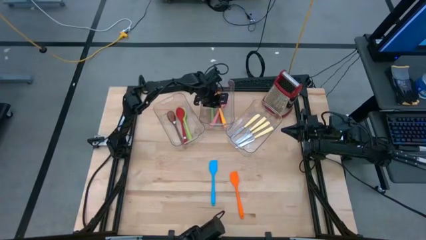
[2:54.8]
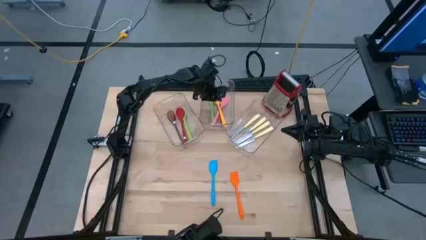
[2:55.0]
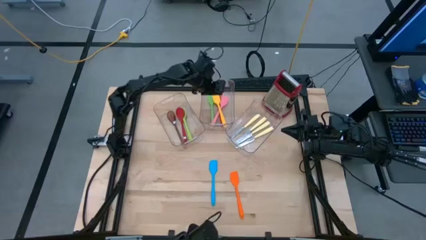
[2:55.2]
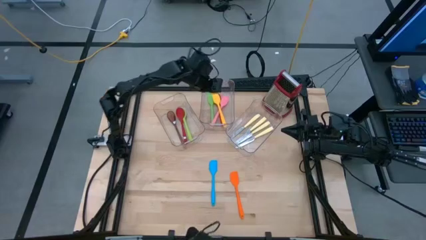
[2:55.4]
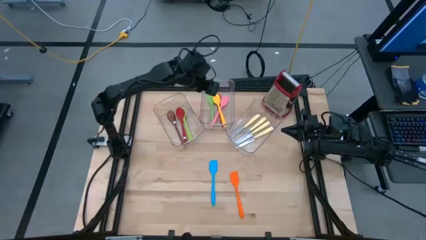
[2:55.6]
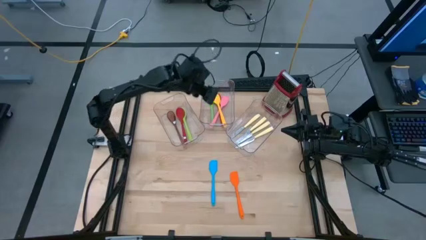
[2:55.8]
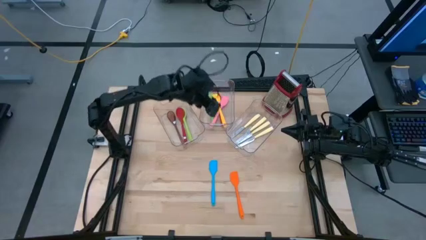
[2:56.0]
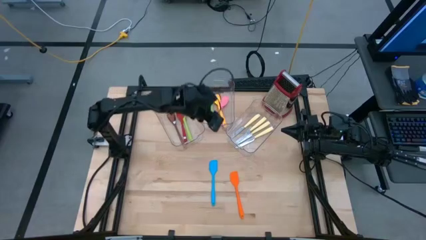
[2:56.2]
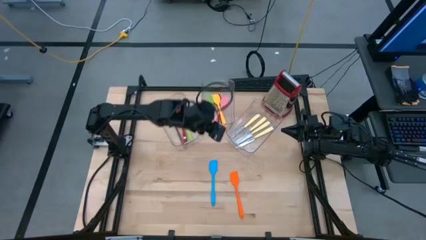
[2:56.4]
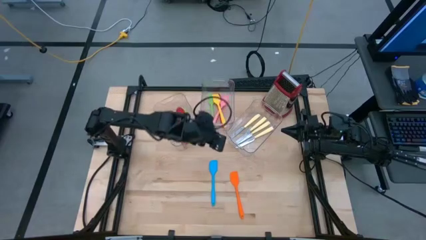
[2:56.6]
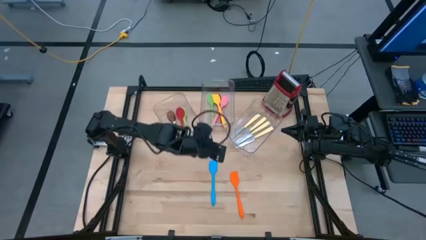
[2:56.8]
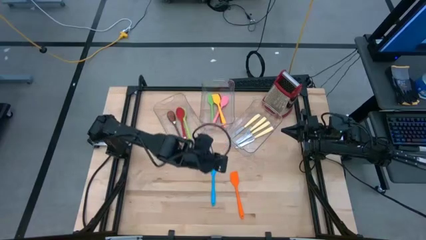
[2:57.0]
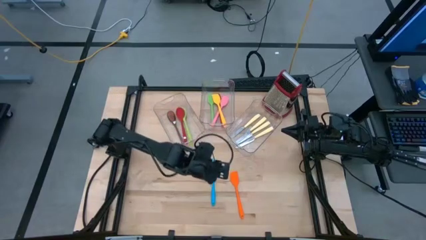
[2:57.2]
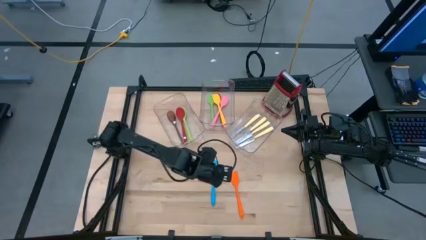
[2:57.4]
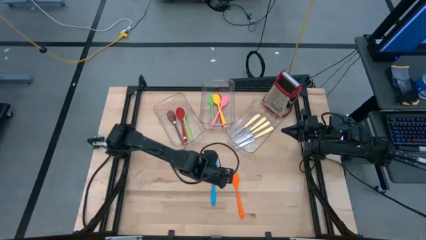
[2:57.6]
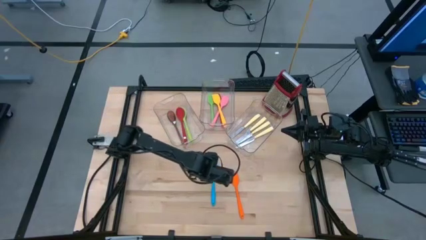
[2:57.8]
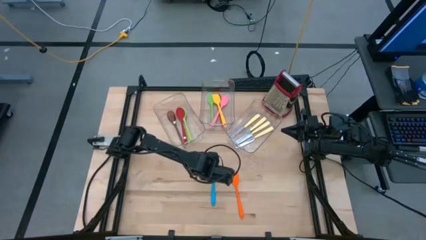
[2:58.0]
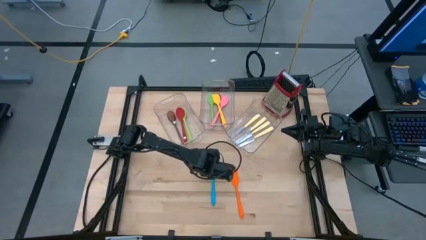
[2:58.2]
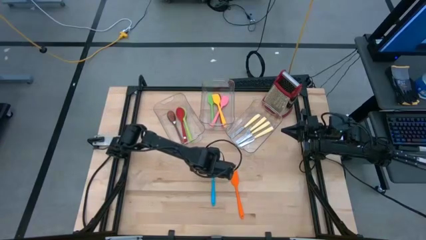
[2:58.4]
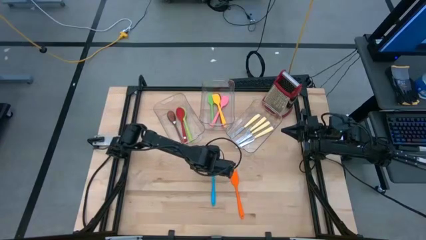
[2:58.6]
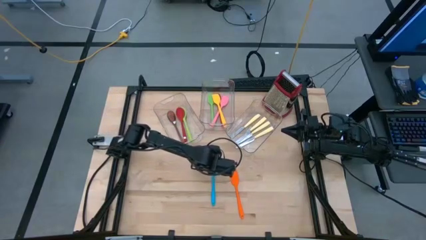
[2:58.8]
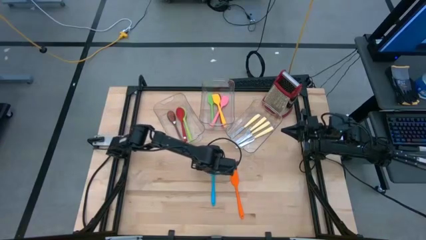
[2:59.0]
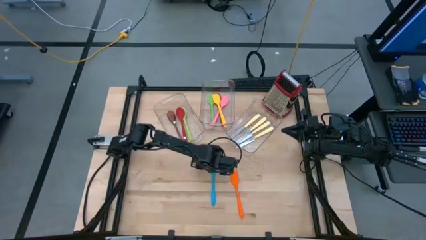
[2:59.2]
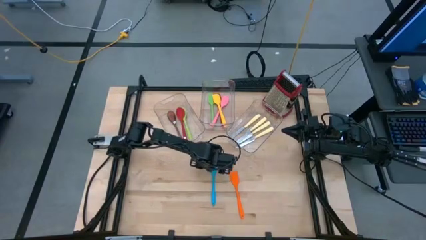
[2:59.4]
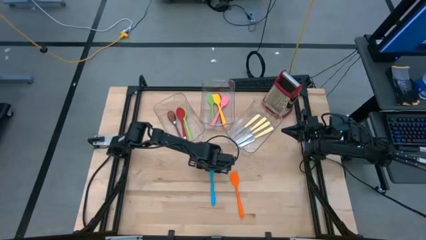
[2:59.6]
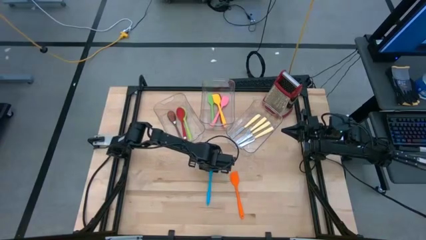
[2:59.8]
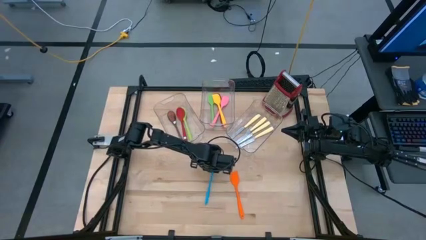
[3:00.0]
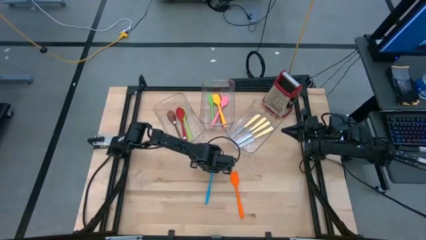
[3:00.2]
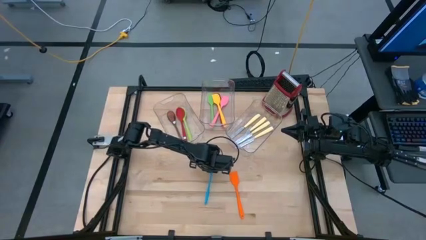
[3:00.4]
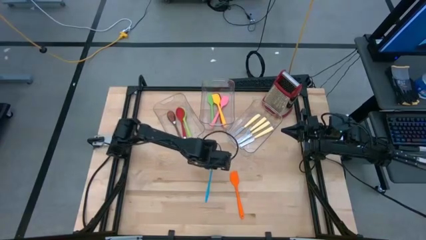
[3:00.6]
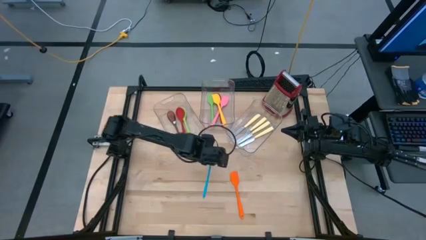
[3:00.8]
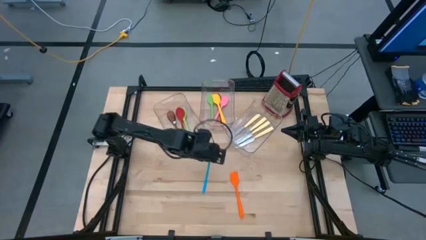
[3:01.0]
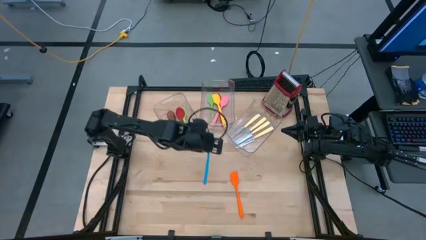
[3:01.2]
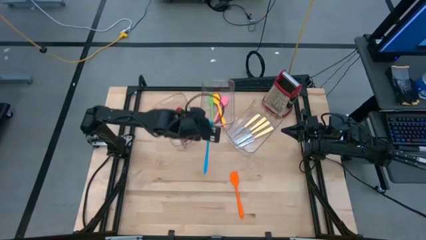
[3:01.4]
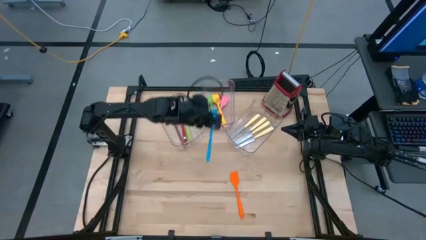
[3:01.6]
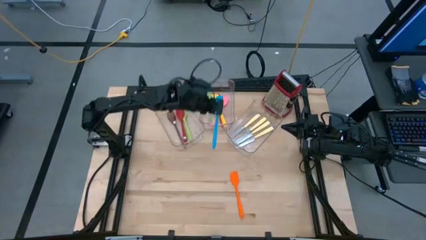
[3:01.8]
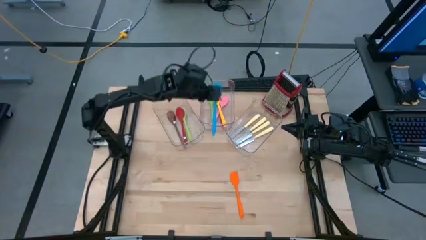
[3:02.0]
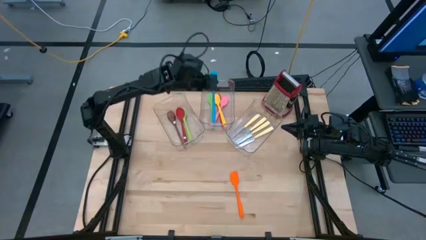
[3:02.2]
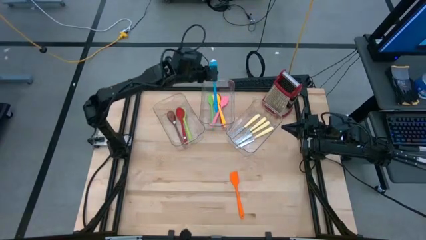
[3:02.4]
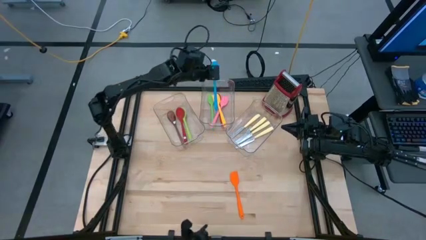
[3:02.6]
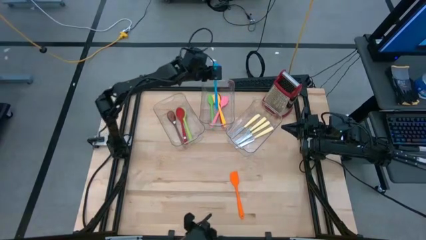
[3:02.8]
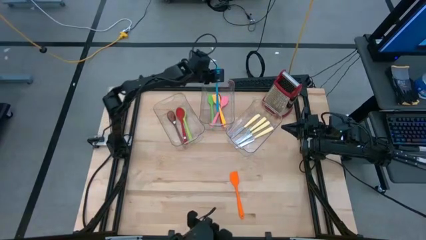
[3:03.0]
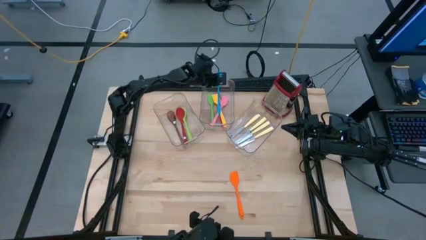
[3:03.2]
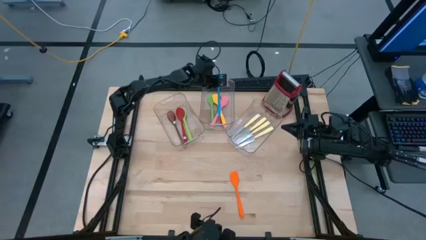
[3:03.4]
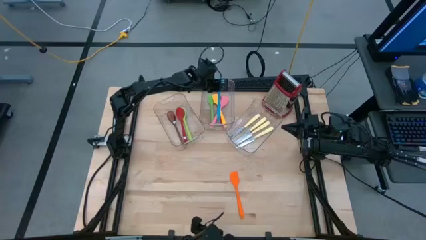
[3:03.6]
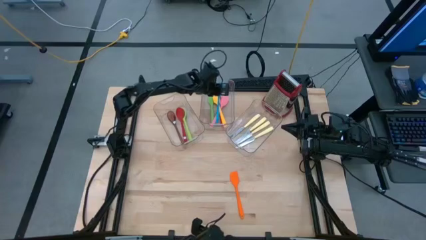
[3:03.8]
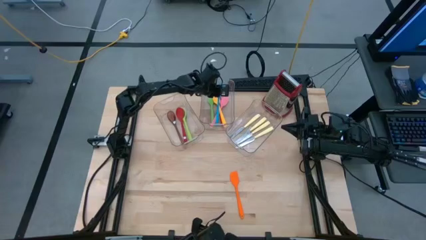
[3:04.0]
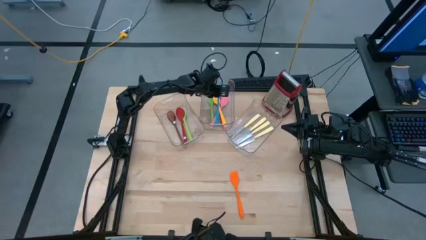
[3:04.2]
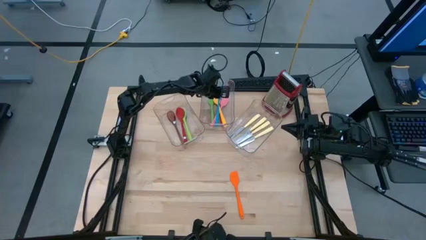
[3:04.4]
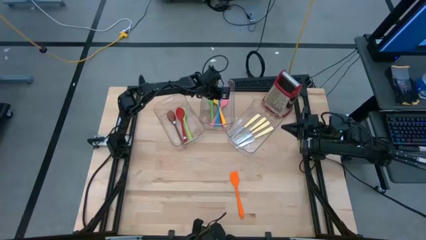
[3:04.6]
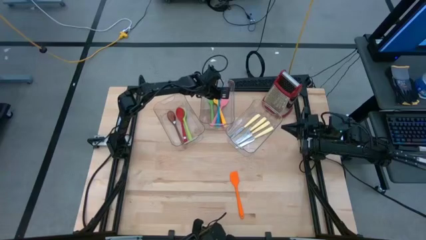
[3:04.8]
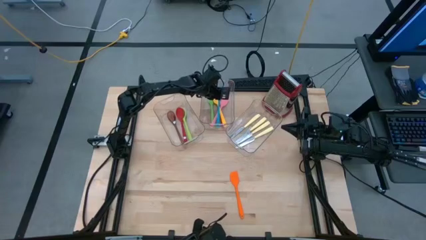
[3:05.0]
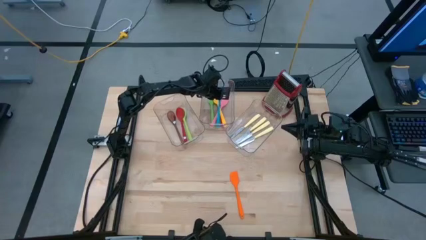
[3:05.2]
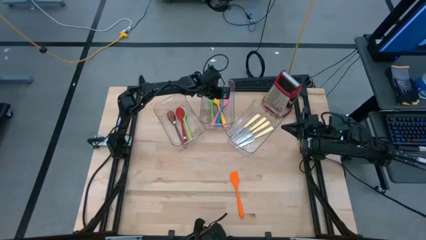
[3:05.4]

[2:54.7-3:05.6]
Task: Pick & Place Kitchen Items
Put the blue spatula into the middle transparent bin

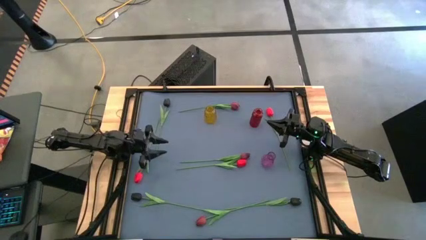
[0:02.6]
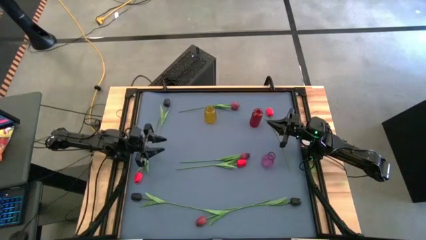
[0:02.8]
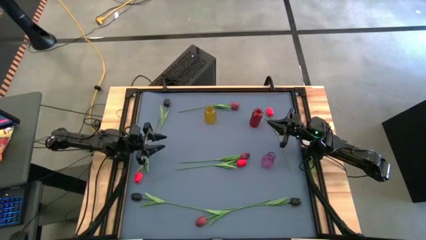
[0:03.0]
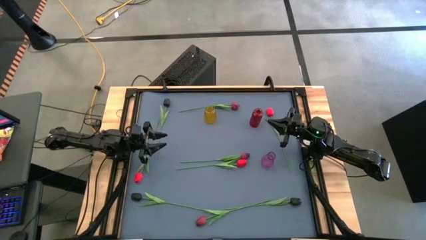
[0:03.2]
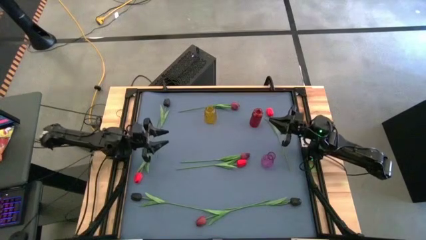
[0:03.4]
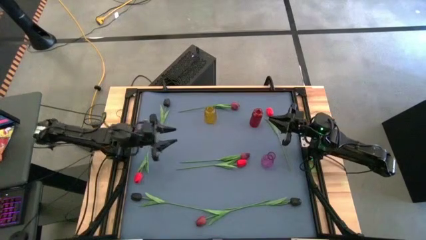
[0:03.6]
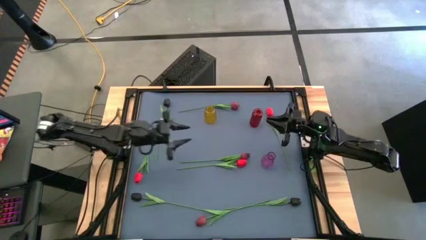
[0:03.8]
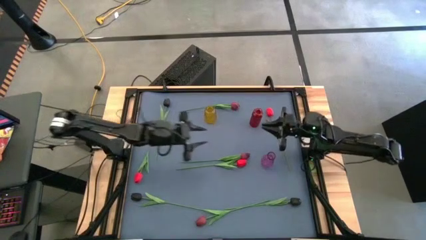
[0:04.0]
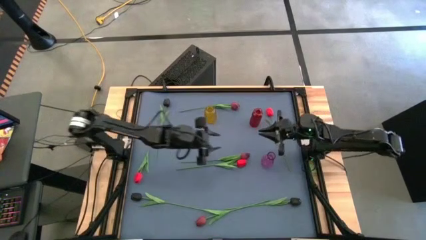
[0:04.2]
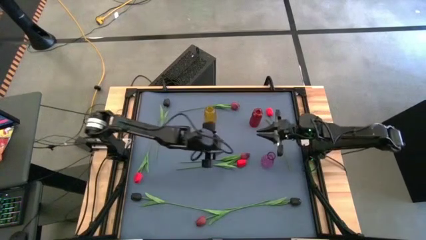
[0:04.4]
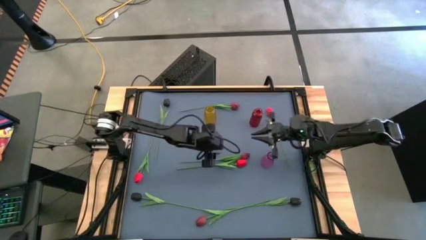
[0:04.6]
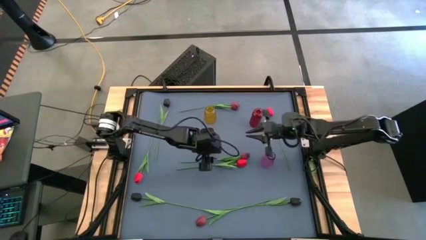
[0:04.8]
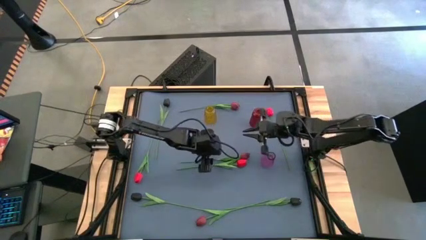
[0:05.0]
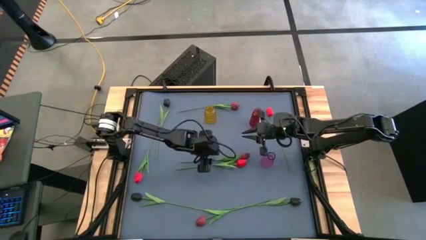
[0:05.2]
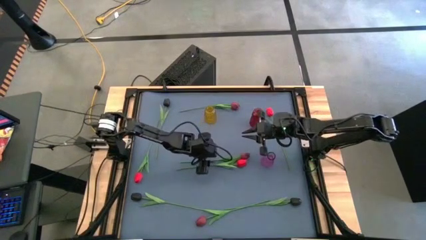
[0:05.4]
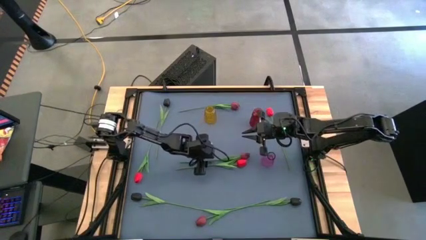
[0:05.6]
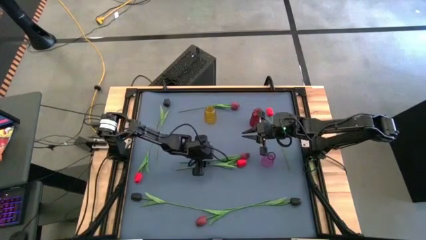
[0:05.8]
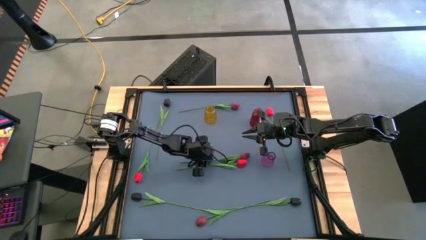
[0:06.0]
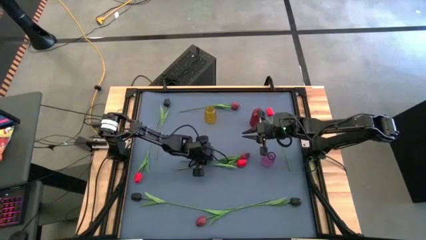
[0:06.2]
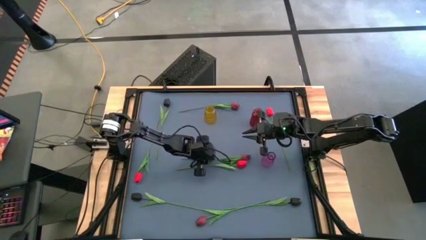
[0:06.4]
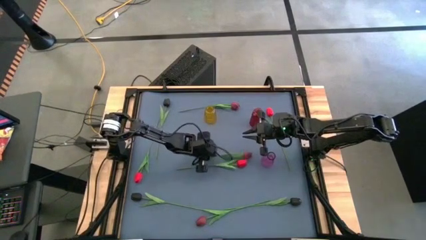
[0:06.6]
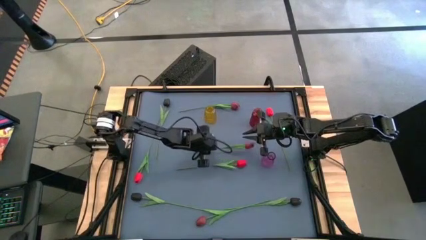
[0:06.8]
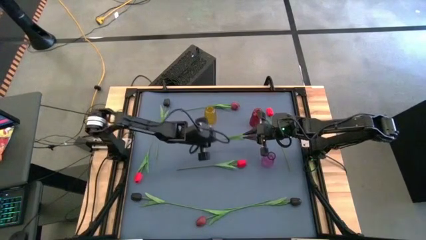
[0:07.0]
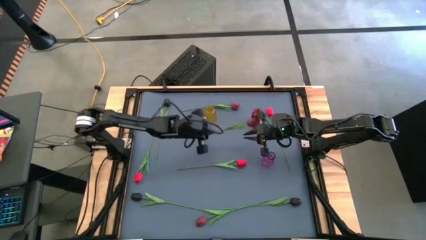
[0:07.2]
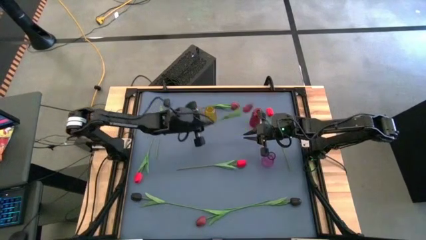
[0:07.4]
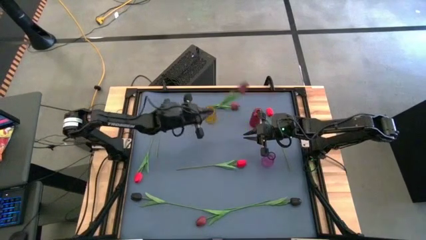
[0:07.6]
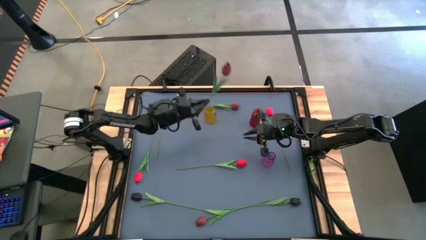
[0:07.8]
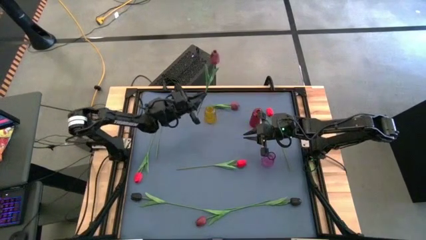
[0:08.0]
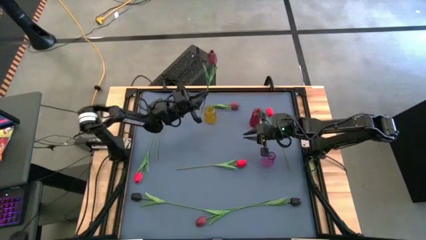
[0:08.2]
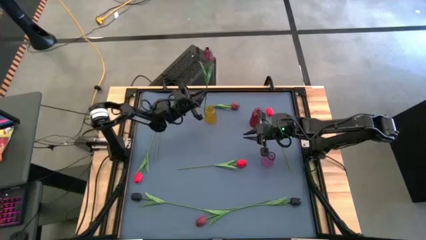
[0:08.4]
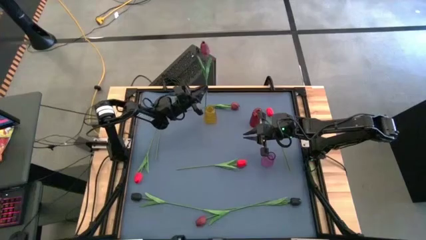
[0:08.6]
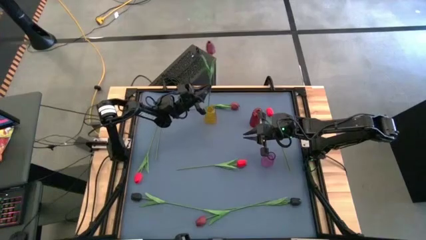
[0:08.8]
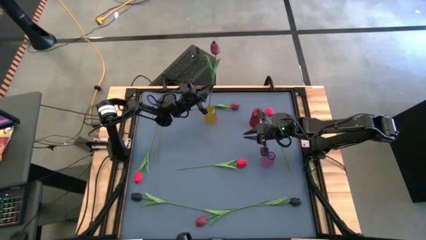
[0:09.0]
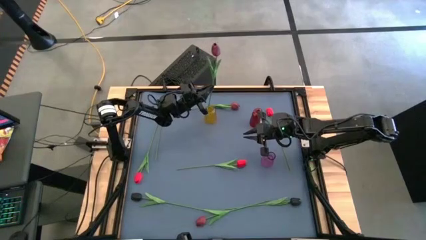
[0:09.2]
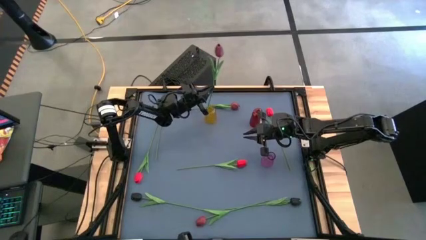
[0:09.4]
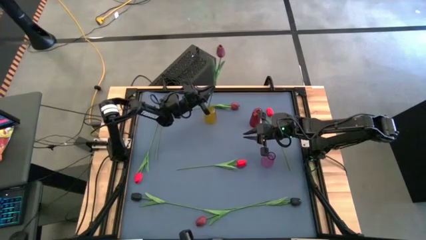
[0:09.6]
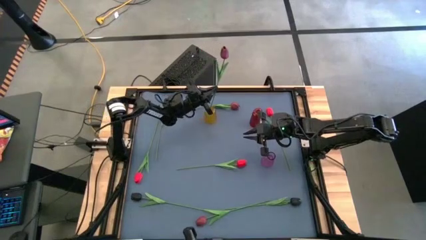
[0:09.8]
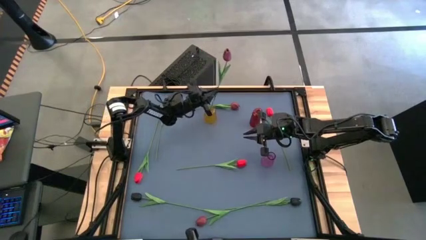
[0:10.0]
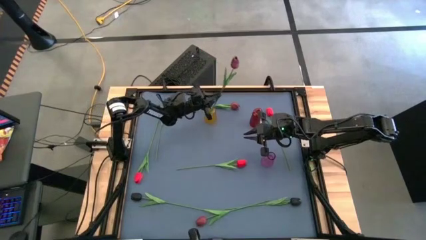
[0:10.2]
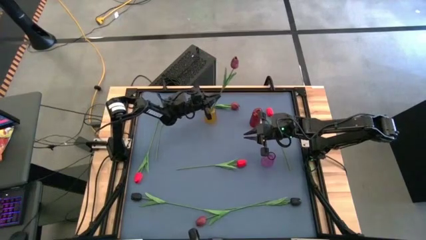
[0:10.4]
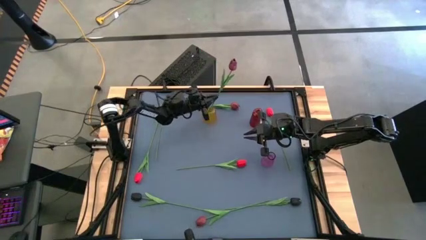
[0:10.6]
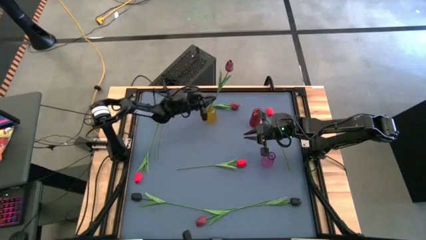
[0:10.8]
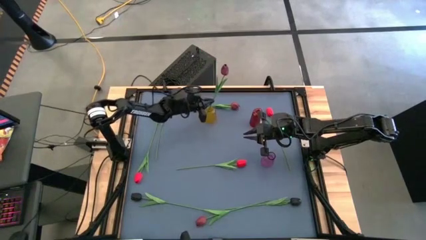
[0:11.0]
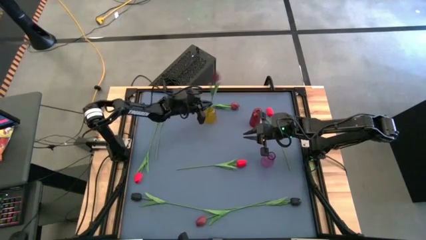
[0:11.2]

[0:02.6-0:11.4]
Task: Sort flowers into vase by color
Put the middle pink flower into the yellow vase
